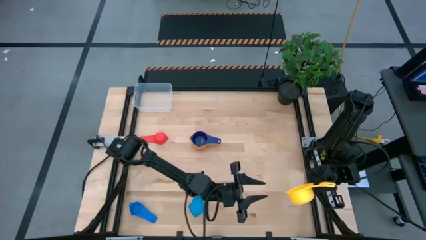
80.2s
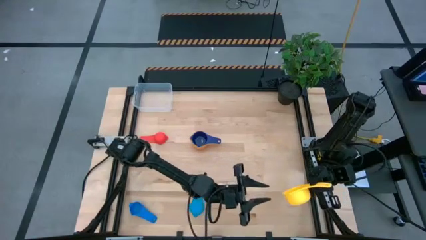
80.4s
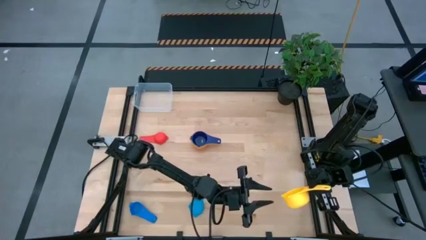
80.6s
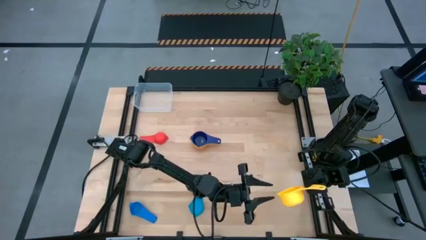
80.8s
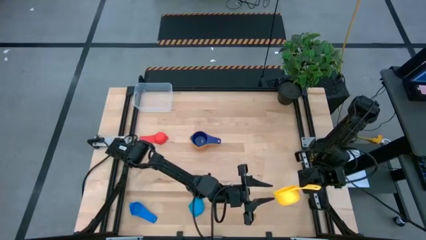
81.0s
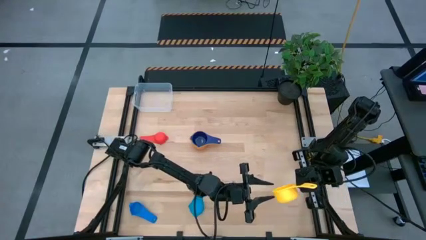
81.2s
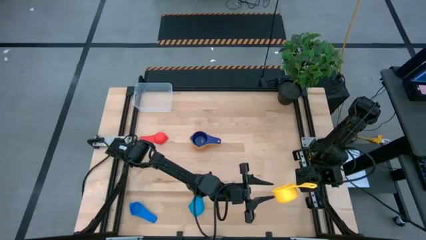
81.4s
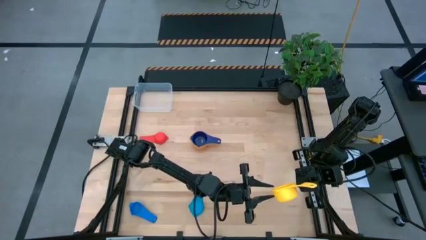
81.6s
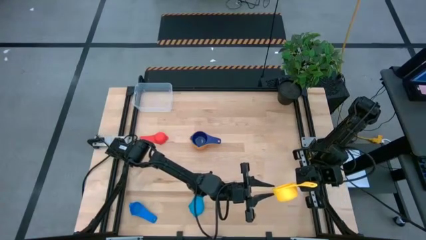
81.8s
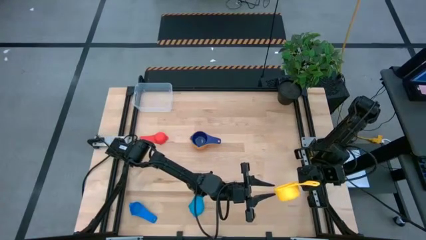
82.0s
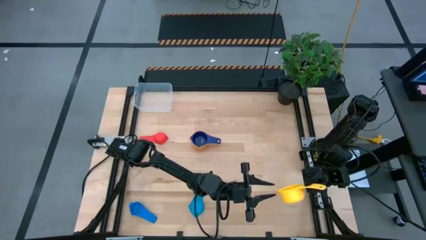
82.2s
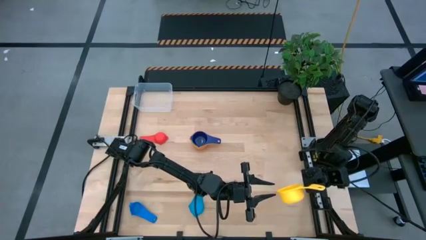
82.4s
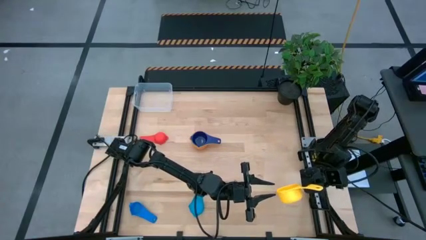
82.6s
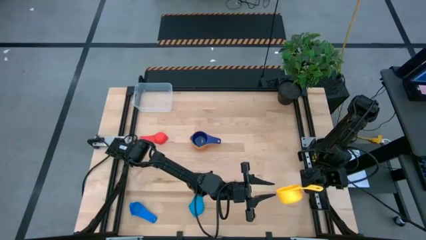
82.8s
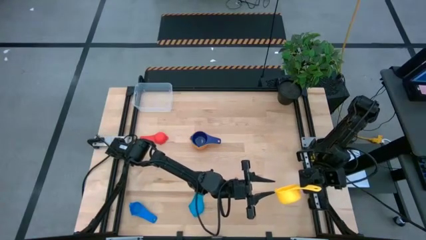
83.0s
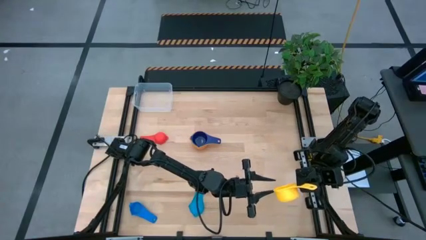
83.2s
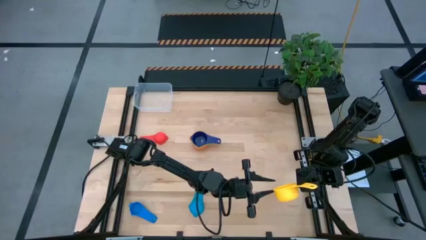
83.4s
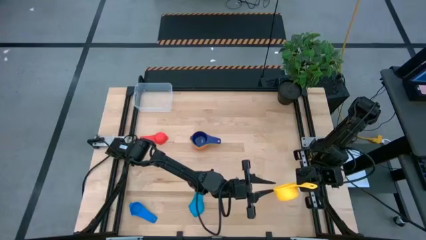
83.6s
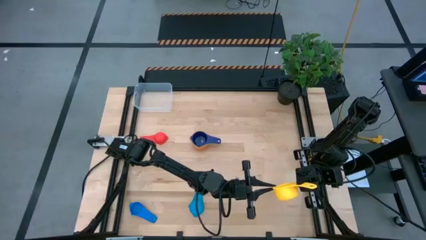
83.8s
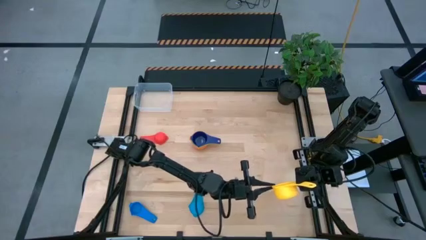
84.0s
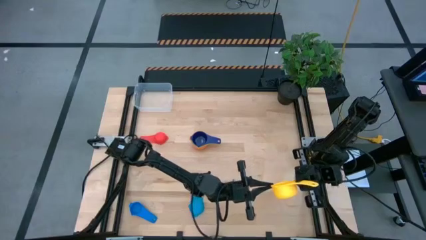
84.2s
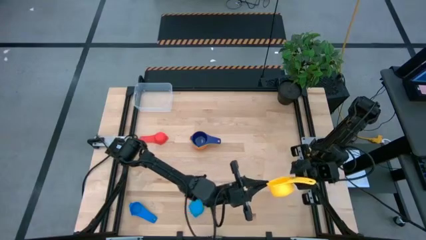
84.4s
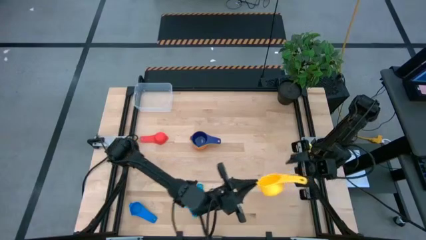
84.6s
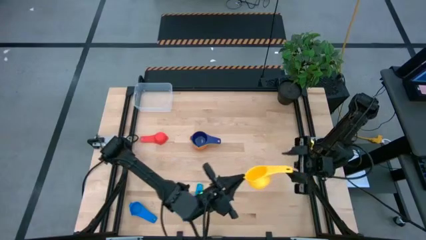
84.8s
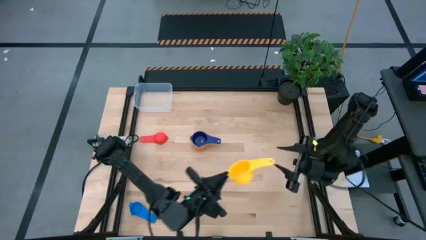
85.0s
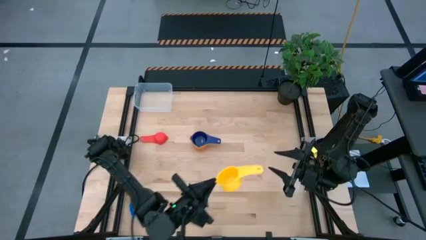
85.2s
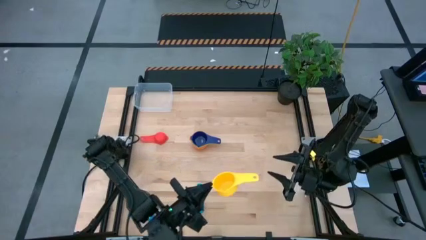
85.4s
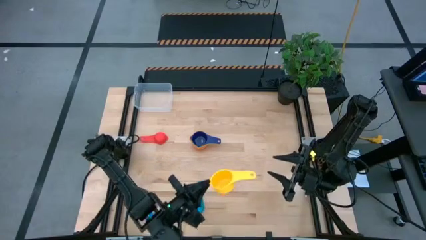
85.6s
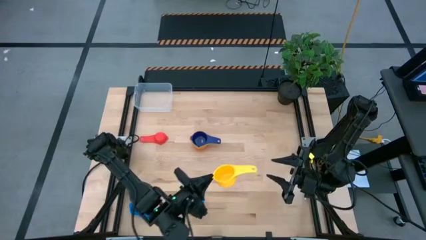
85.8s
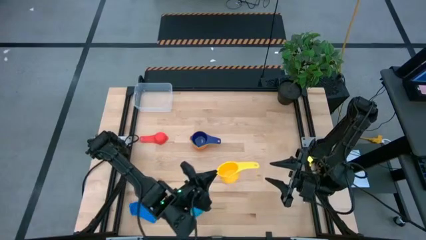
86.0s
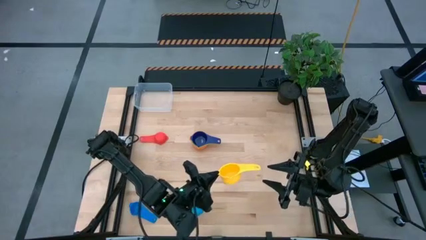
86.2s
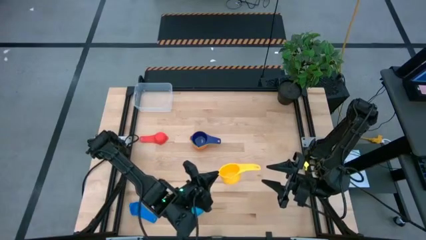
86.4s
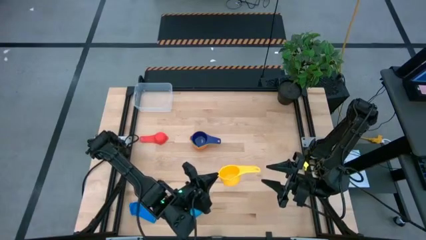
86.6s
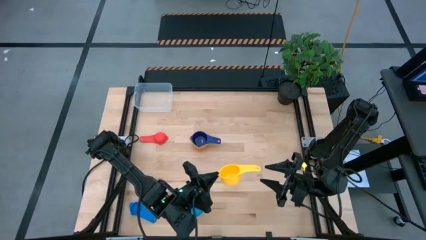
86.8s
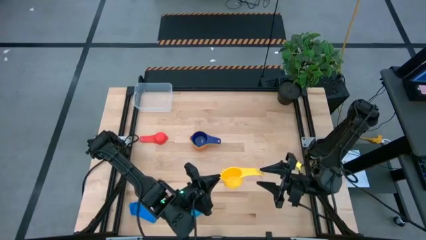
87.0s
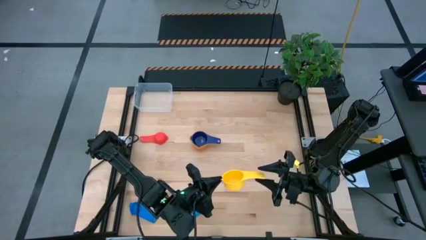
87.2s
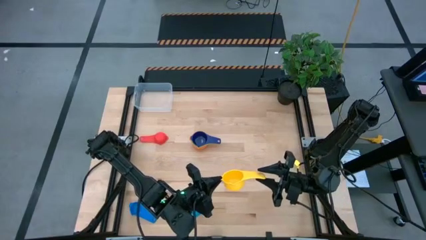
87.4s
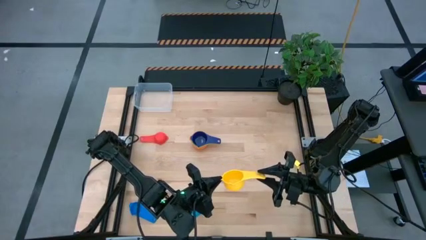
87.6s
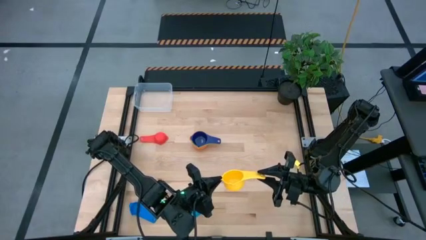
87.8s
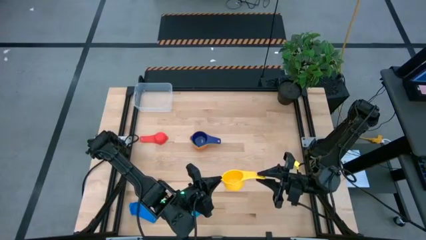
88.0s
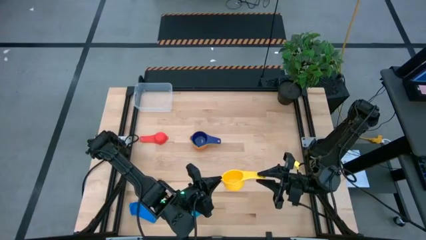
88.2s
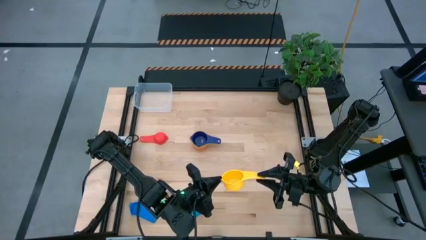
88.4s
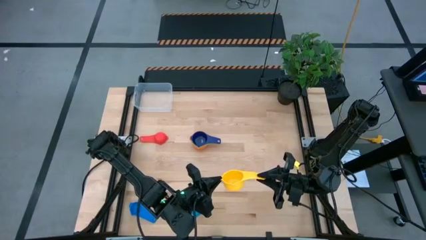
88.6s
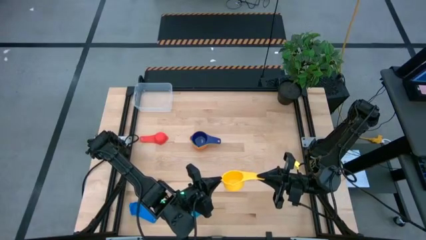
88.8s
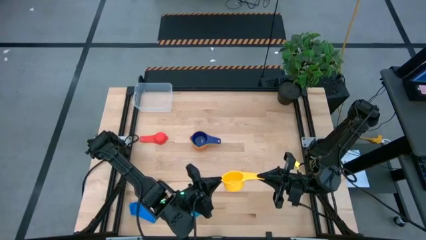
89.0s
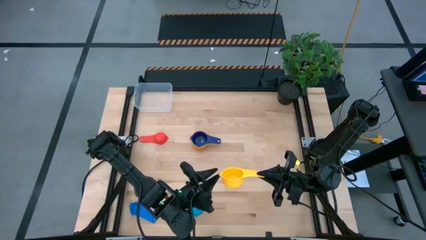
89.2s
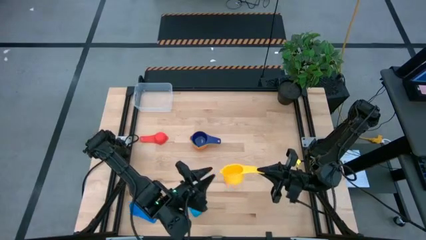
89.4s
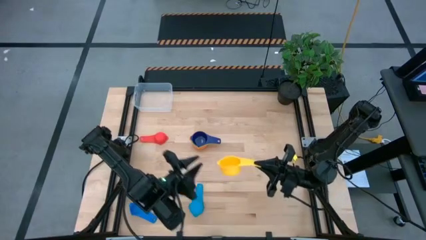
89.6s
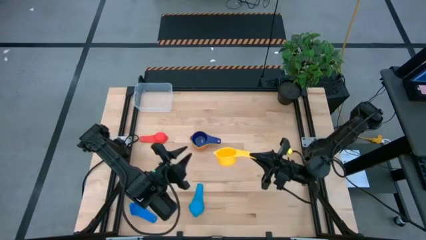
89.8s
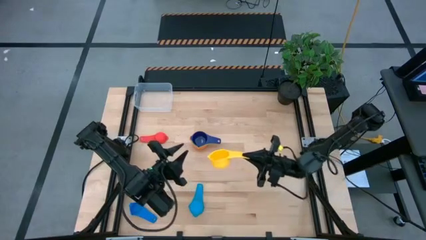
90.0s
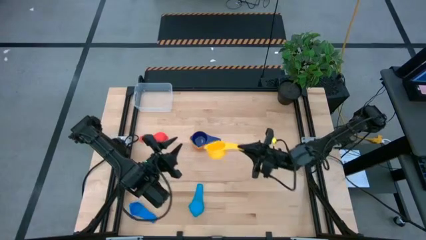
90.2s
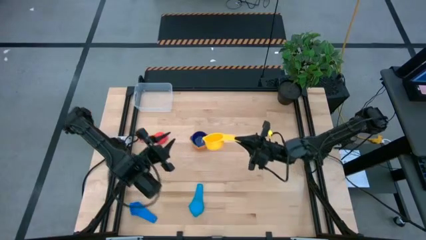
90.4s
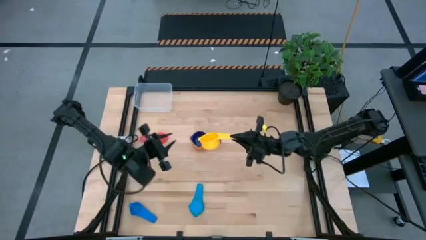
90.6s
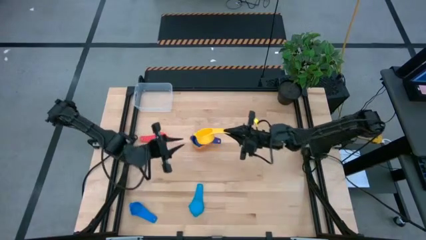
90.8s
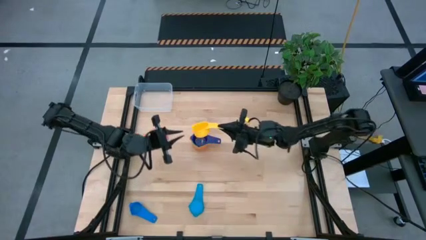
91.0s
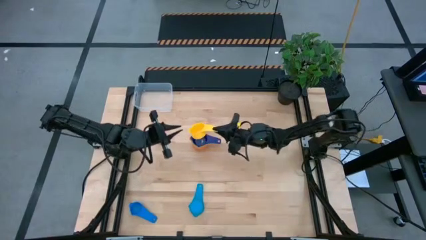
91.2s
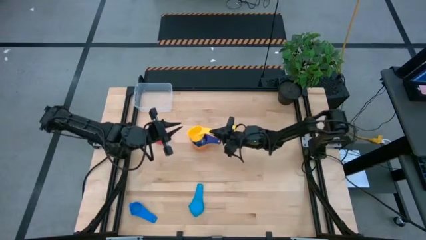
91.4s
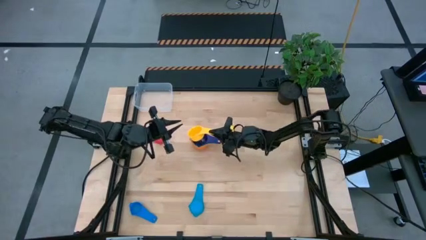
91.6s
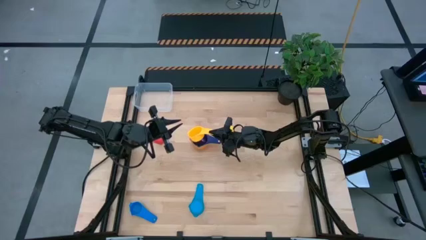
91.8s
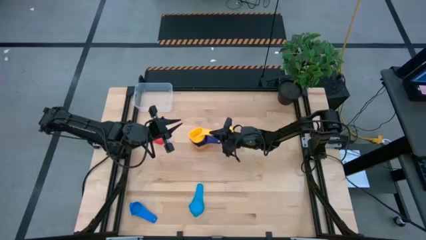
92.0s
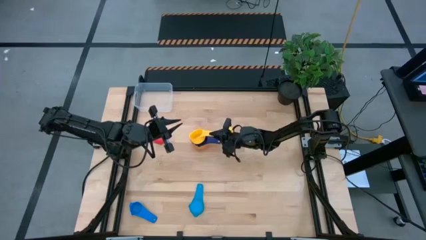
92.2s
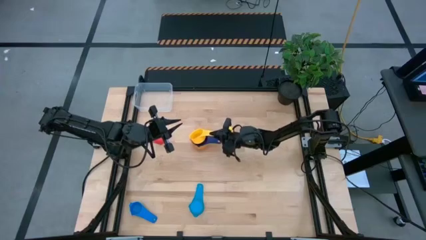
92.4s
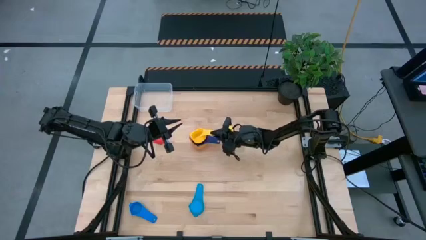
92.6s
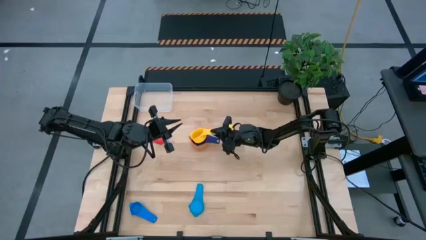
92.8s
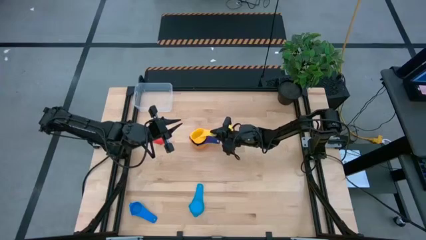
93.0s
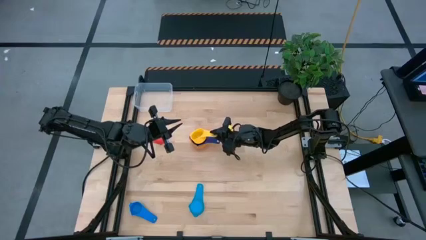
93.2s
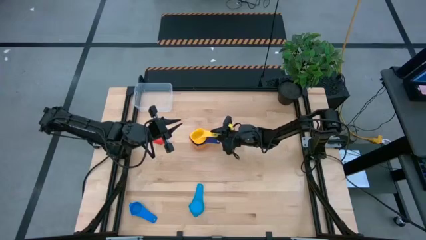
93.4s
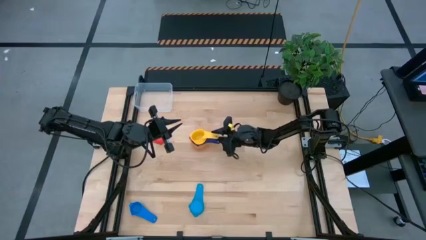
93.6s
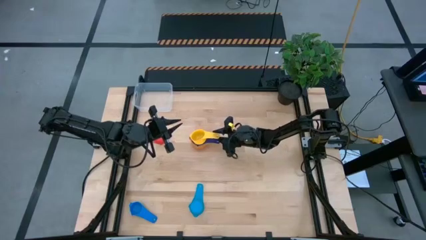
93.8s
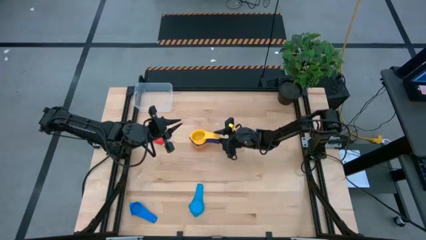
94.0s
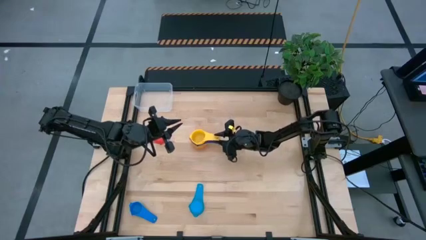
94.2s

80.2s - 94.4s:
Task: Nest measuring cups in basket
Stack the yellow measuring cup on top of the violet measuring cup

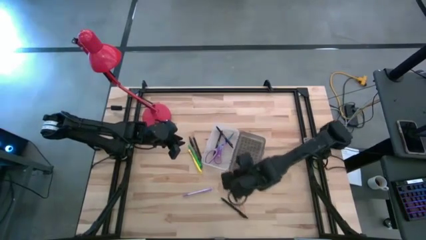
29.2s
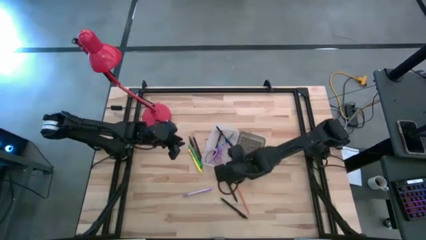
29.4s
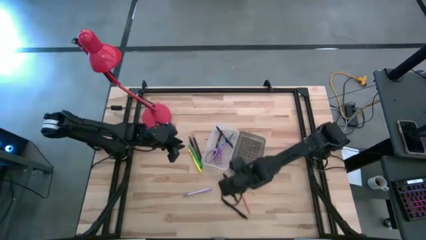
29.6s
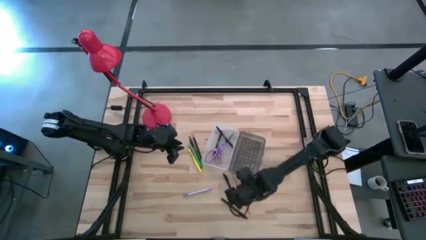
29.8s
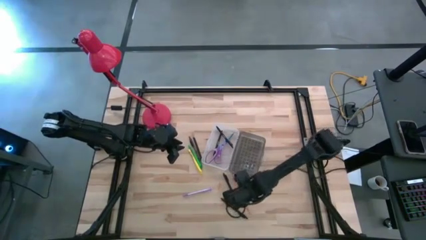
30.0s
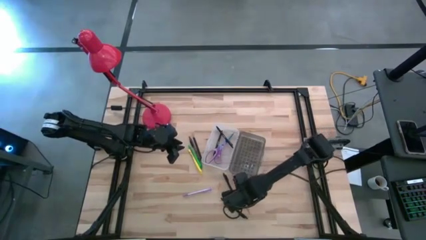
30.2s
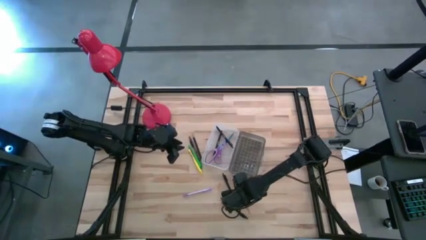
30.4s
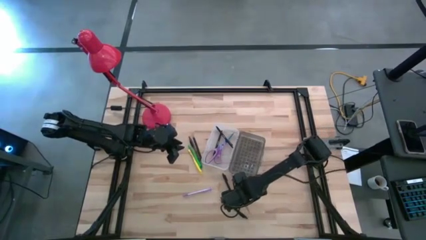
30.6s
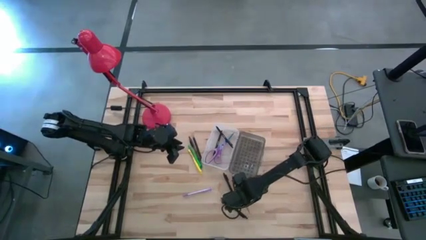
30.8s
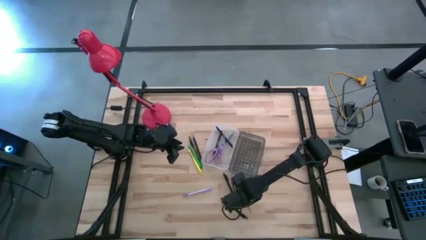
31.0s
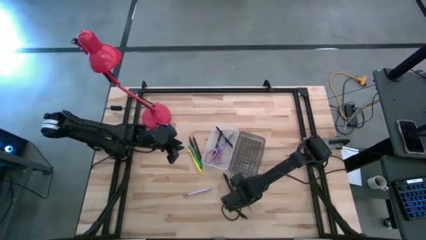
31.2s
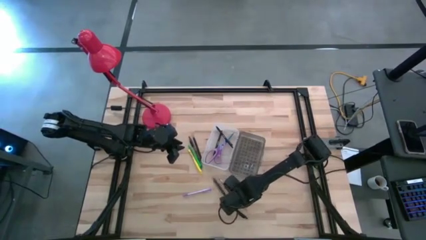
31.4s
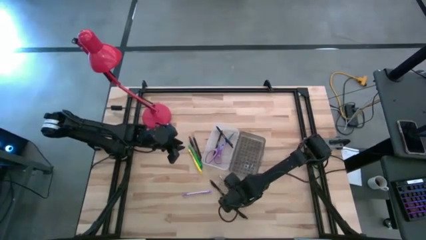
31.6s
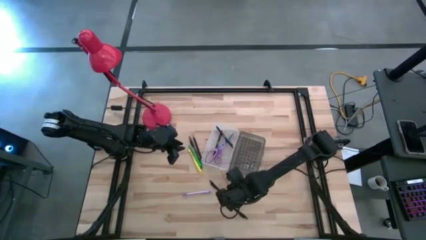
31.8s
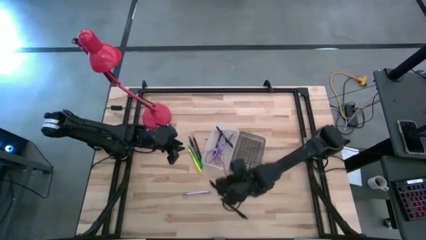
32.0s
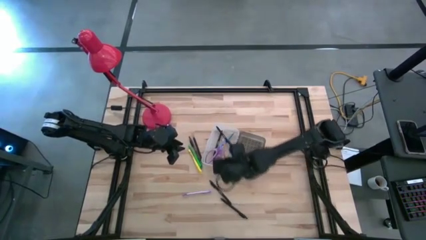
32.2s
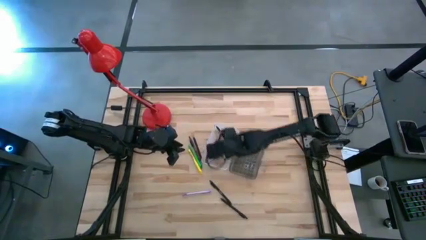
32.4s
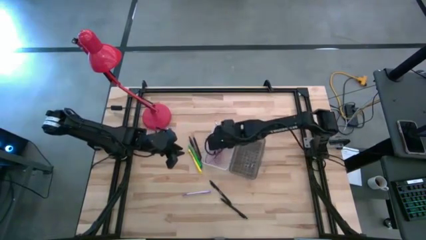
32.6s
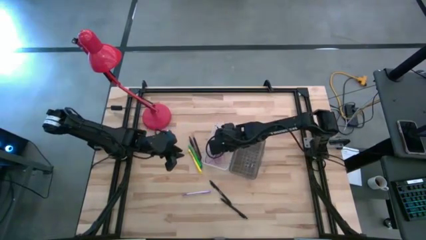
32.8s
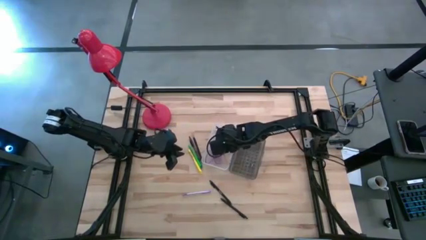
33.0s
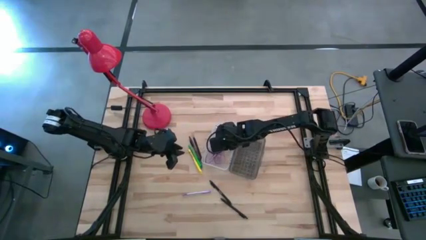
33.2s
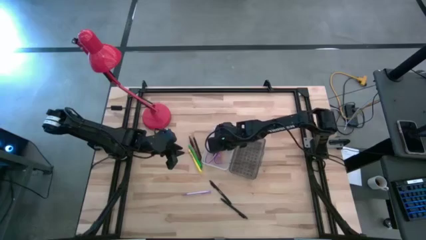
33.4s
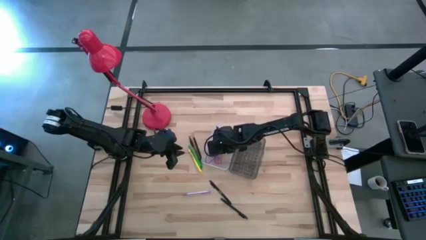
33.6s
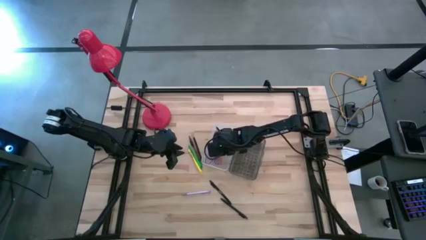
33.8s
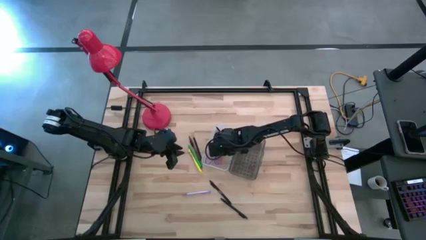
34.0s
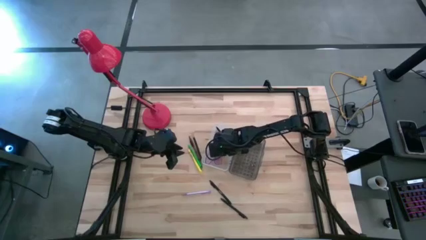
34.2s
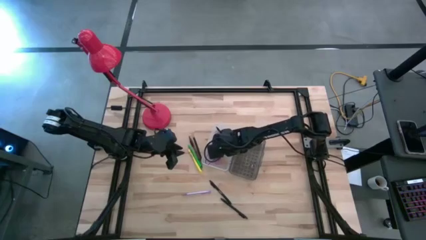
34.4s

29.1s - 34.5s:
Task: Pick & place school supplies into a supply box
Put the orange pencil into the supply box
